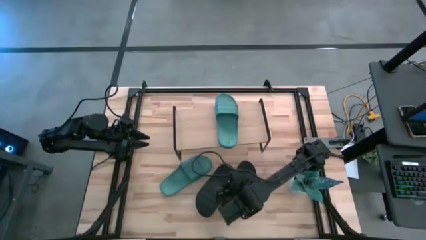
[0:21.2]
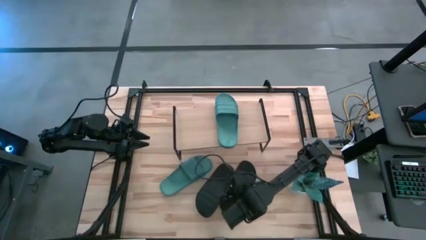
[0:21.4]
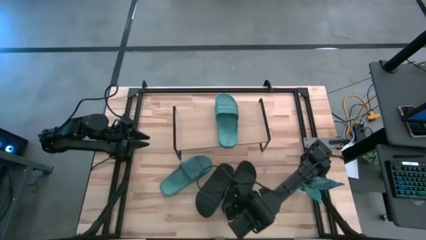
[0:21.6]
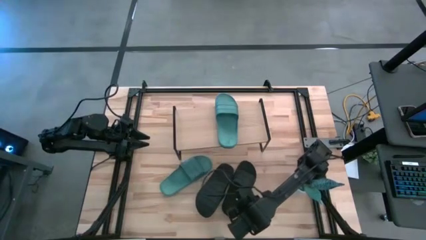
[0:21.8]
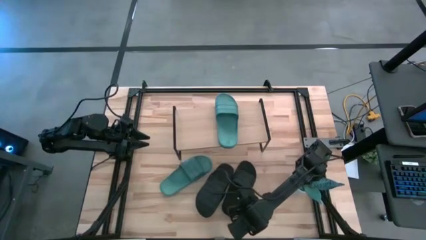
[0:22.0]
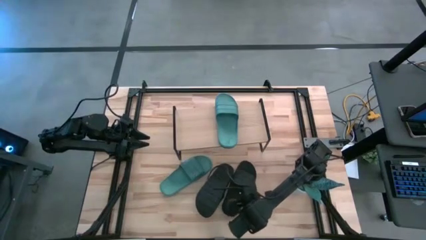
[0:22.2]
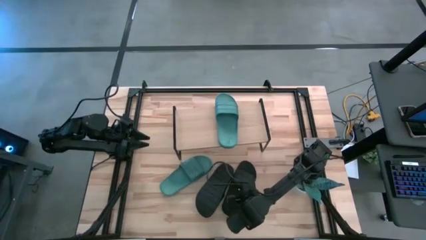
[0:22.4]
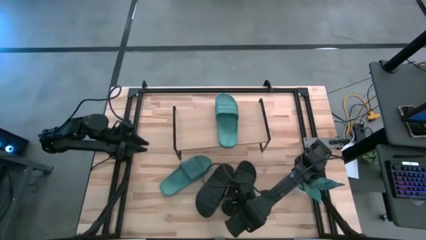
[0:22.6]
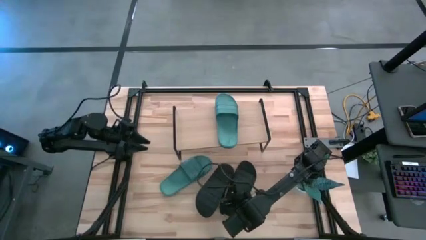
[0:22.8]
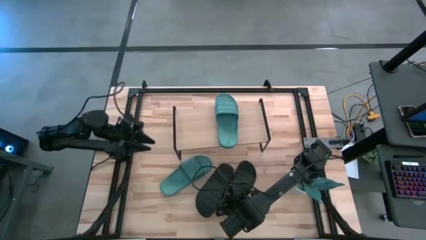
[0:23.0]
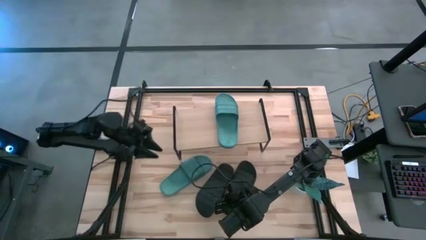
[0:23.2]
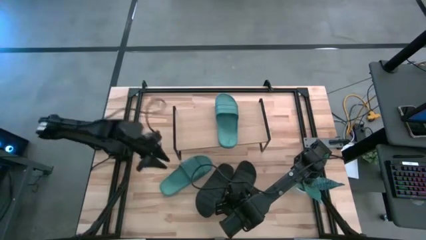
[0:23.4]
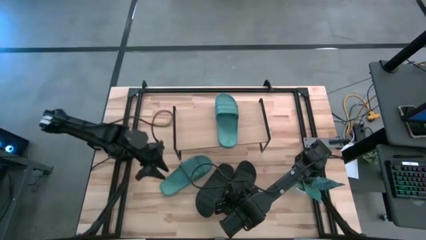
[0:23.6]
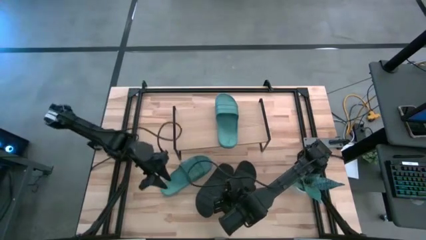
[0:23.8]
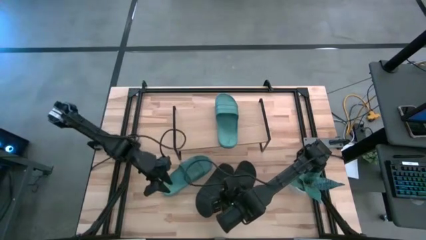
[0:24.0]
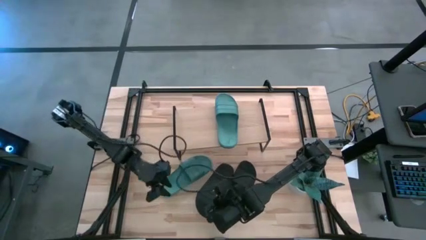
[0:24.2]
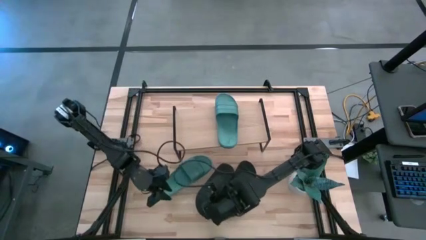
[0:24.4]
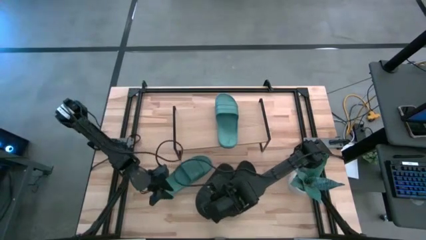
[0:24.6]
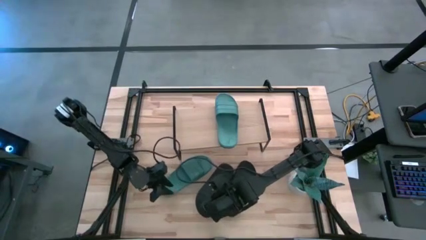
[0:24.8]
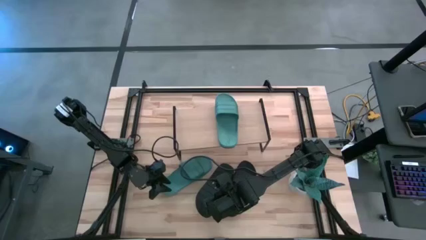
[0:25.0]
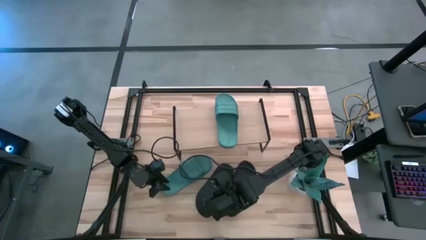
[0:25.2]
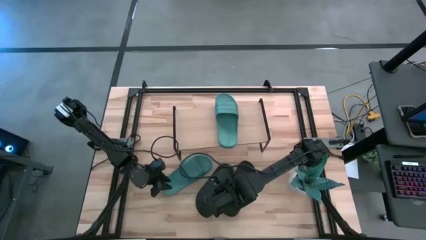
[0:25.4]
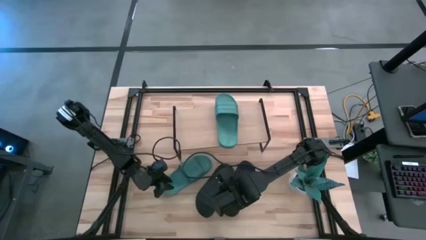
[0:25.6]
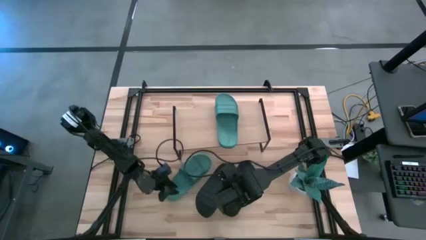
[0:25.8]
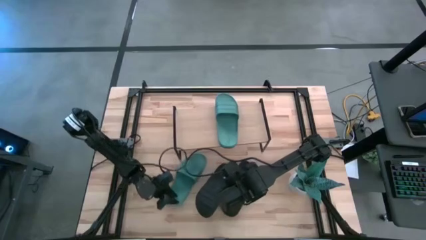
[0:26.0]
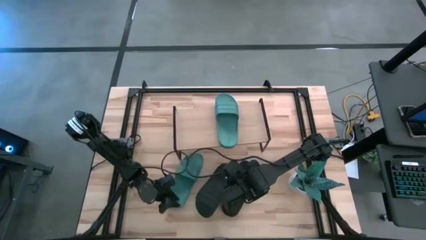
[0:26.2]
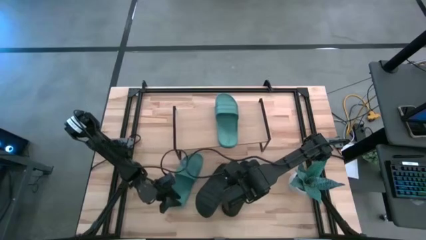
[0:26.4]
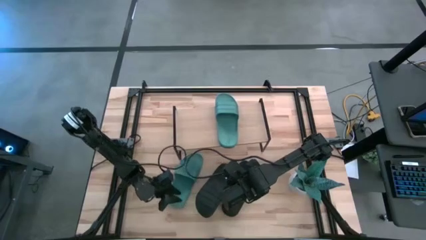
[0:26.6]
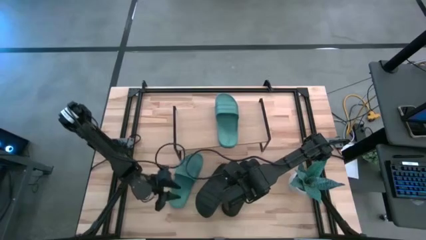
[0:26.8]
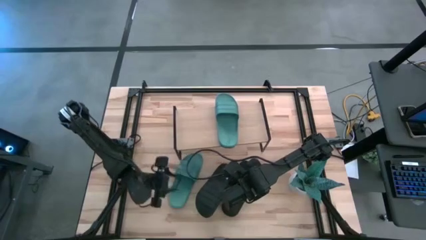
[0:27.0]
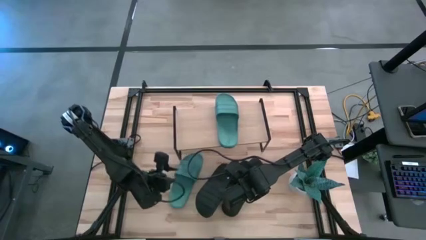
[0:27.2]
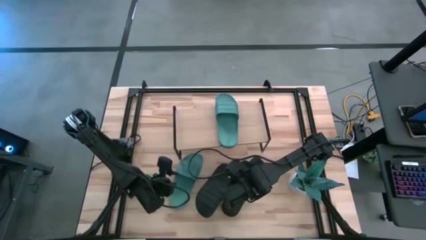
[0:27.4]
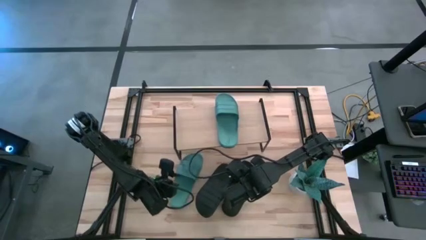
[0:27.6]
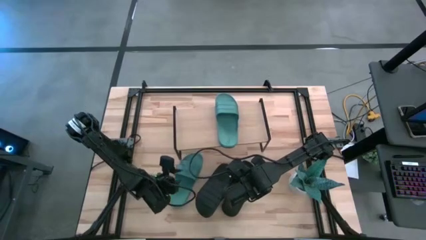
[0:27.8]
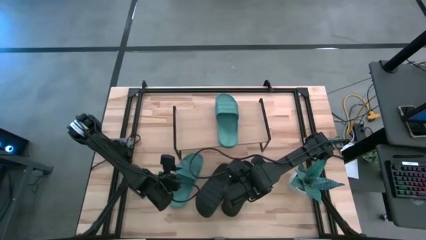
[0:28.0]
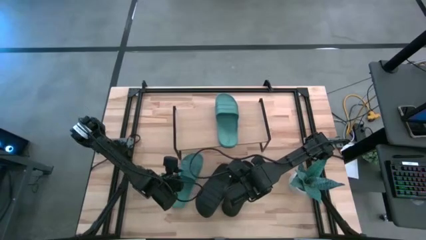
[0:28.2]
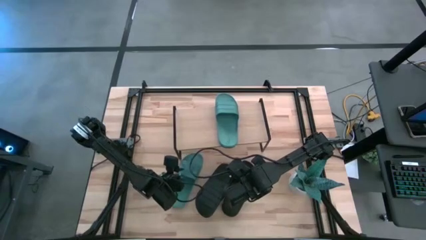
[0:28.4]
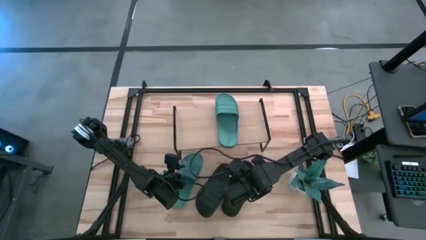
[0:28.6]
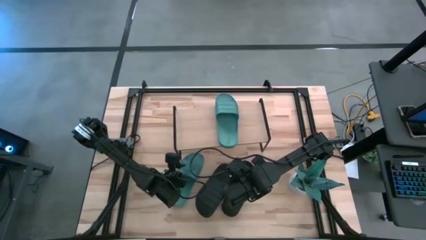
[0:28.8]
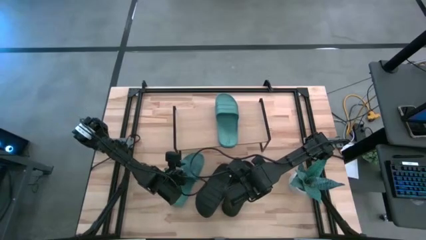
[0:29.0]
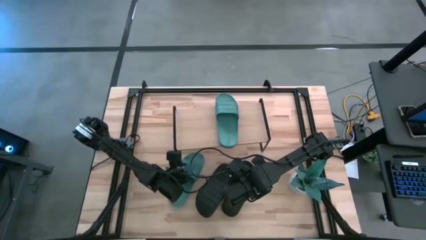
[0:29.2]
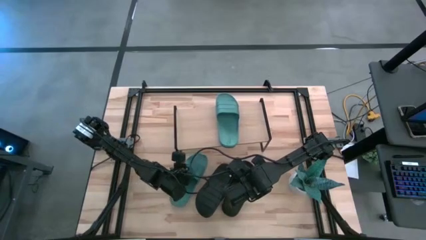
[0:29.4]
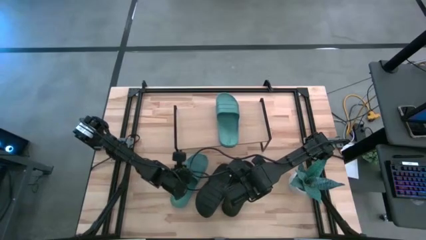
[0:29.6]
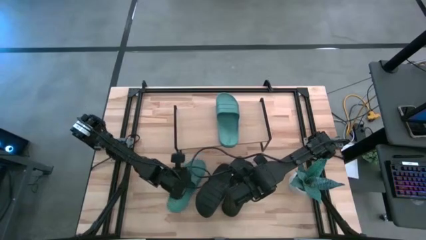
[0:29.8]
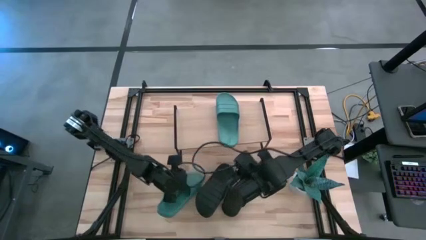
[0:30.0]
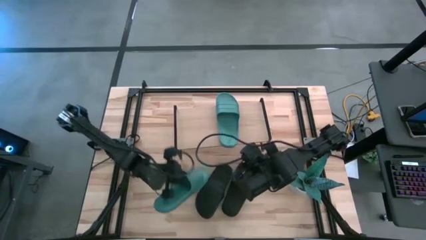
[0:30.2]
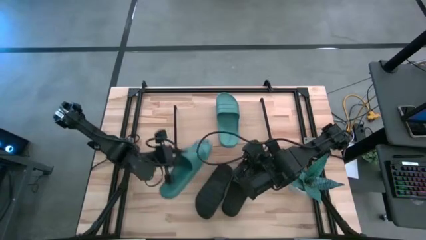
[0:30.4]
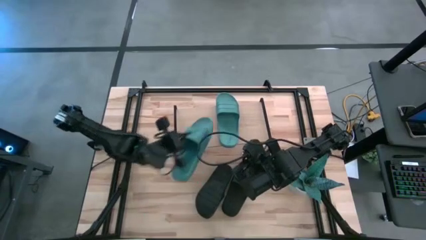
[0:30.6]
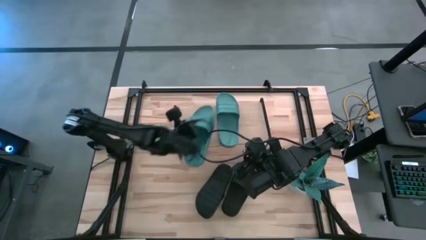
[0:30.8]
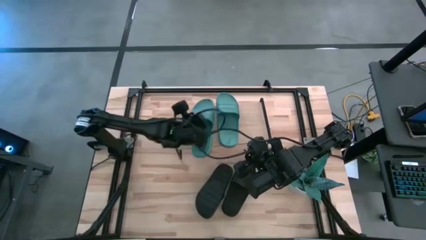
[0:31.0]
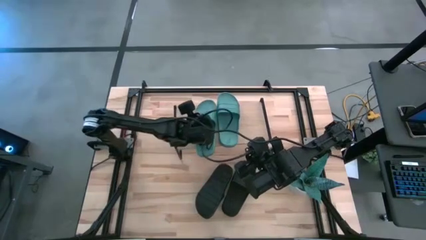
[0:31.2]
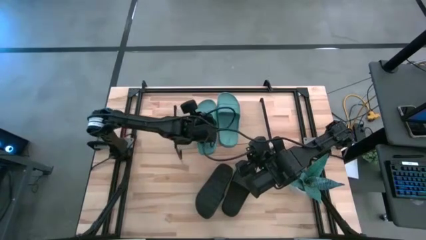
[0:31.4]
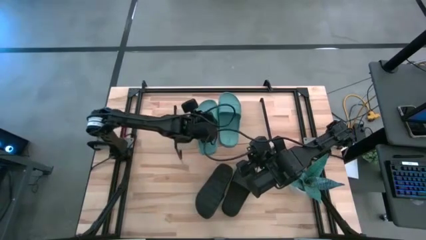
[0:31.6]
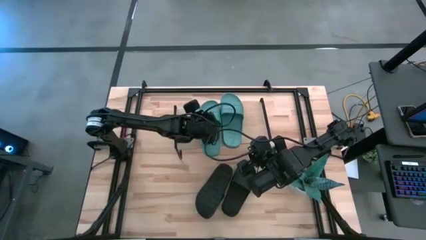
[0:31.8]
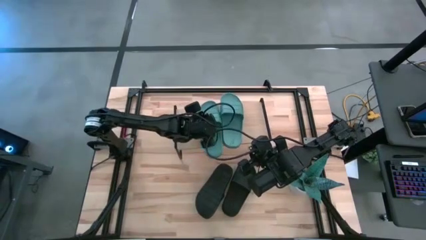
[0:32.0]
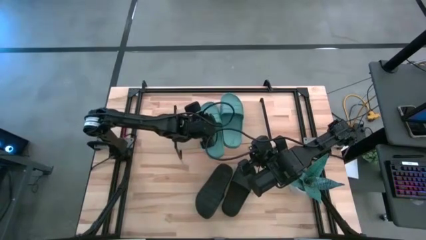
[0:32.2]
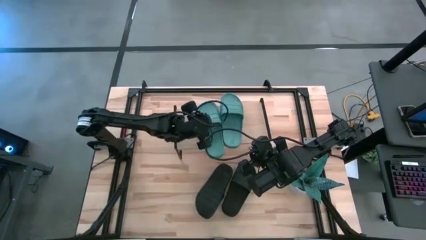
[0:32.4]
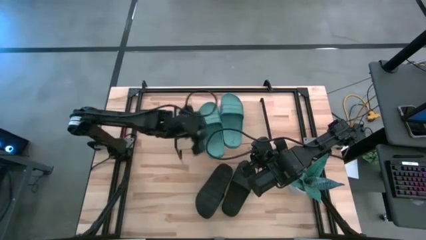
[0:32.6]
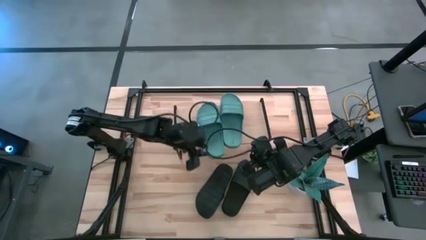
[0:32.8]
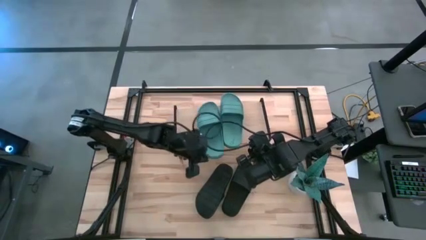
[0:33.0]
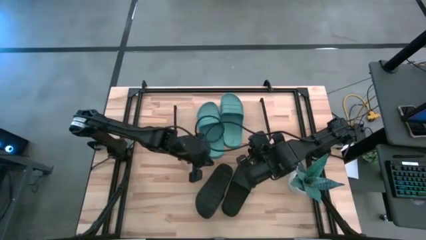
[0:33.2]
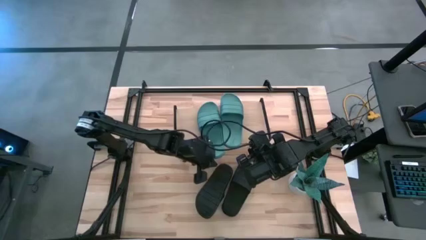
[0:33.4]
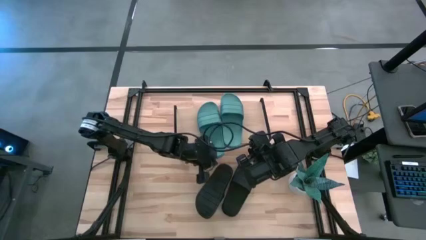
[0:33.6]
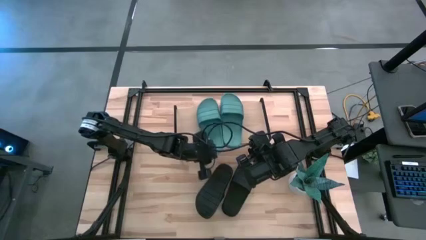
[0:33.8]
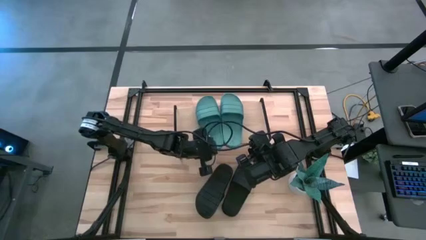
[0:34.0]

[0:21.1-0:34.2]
Task: Pick and place slides into the shelf
Put the blue slipper on the shelf

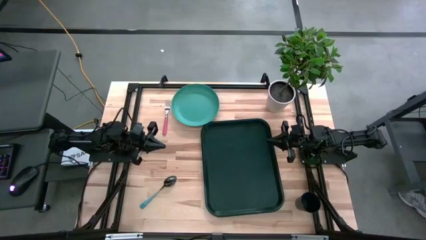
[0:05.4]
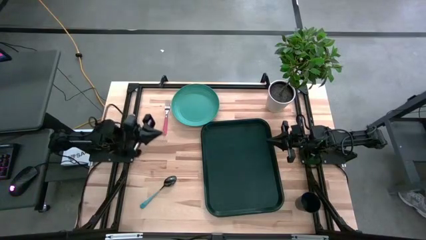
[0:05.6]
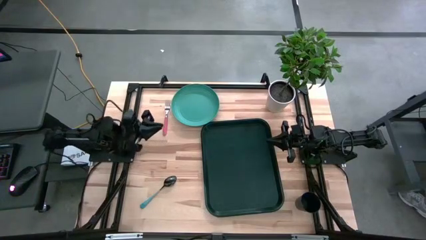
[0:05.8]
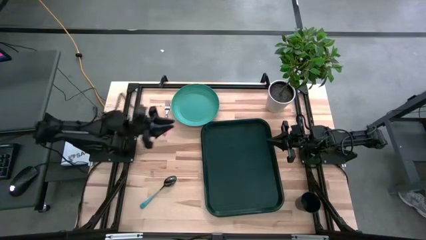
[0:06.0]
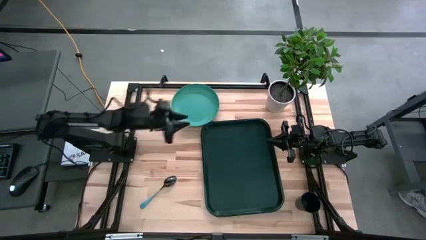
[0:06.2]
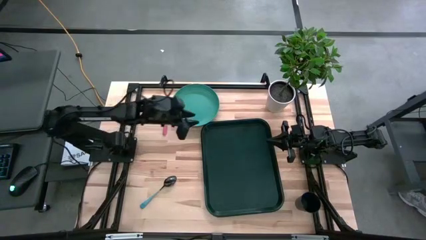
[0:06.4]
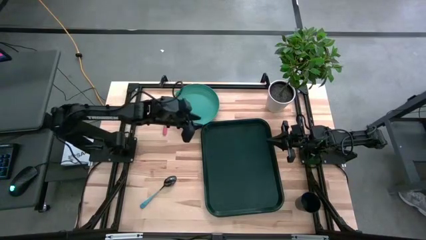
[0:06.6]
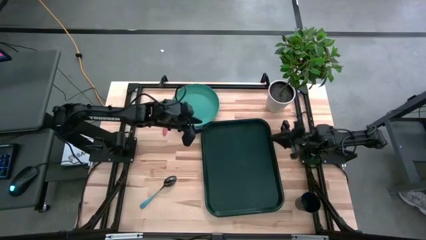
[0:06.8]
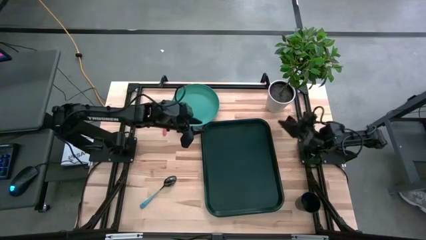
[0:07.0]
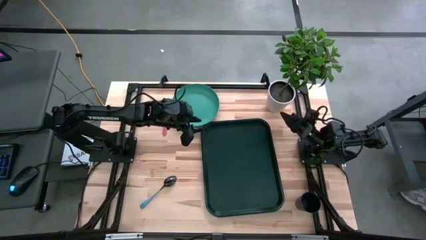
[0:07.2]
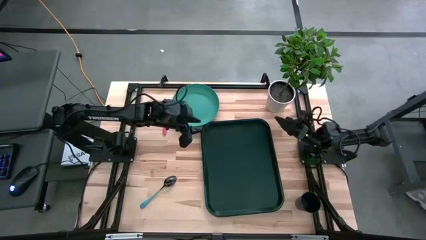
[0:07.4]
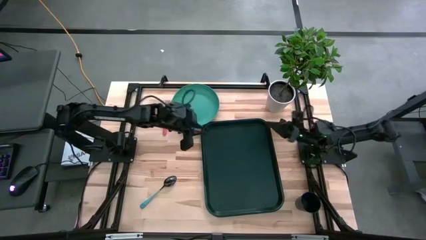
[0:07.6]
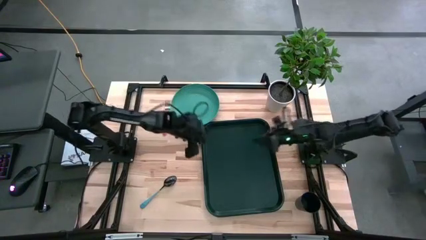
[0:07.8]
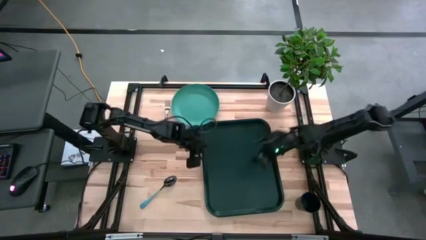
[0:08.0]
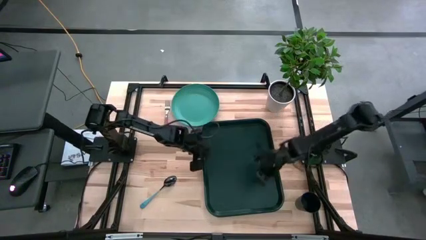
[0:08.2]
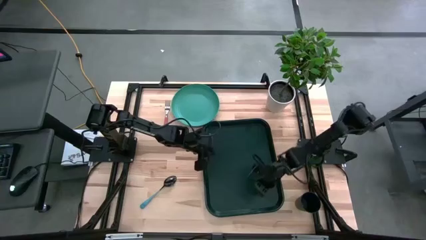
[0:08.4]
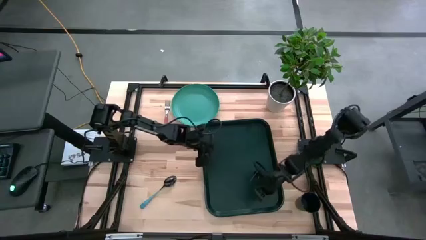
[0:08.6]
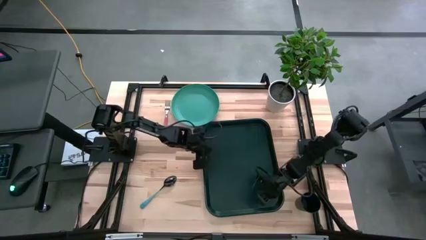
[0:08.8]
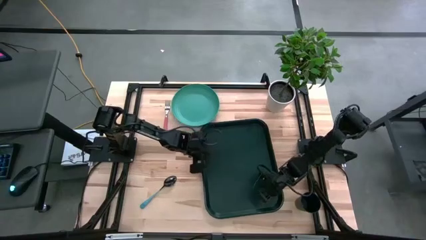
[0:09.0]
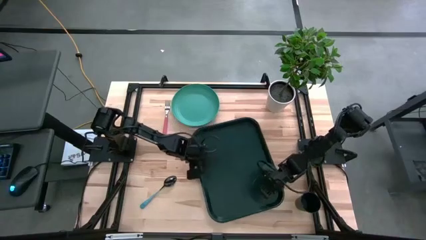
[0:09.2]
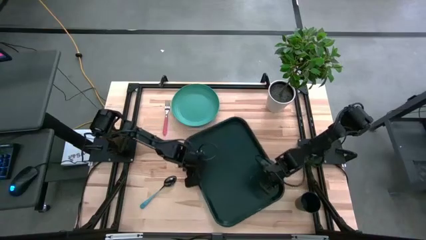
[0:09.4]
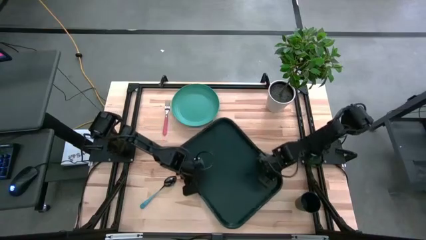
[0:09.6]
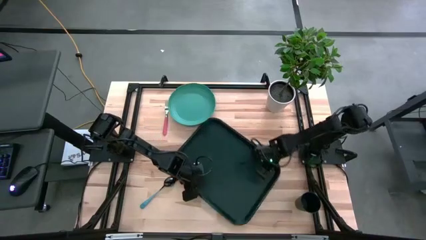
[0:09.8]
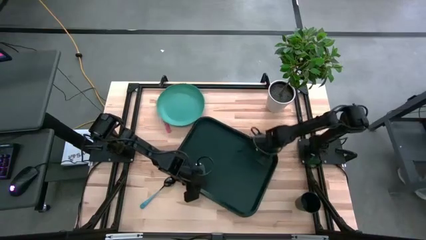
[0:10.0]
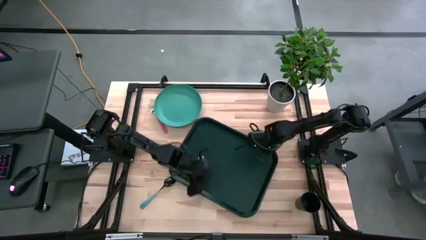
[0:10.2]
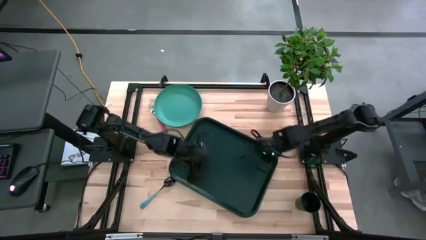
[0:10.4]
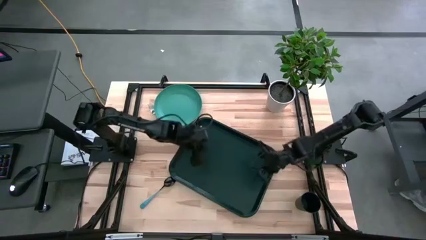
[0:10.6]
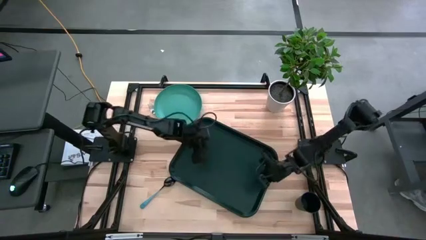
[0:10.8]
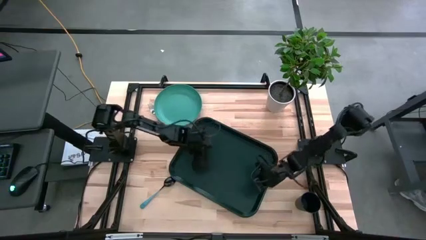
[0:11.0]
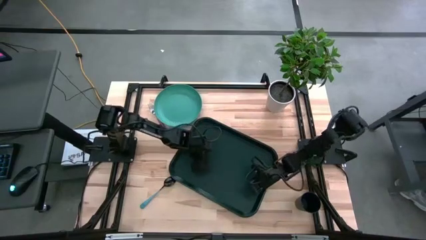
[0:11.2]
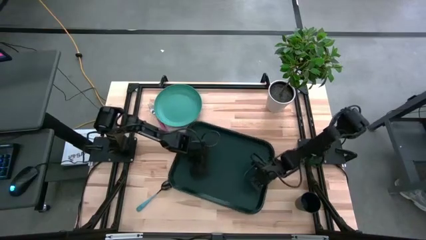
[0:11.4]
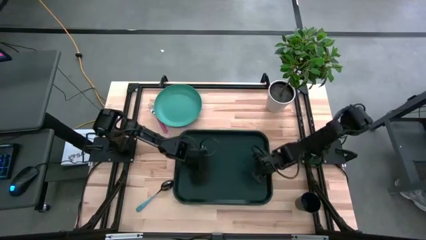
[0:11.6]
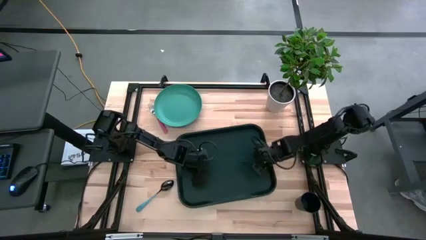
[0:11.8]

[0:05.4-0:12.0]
Task: Pick and place plate/cup/fork/spoon on tray
Adjust the black serving tray
